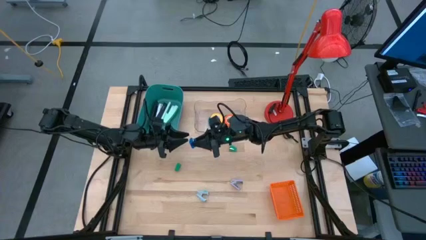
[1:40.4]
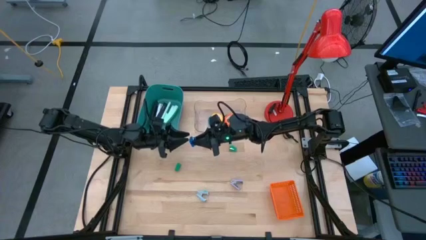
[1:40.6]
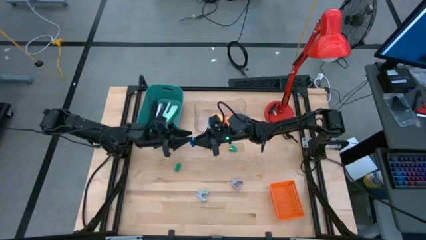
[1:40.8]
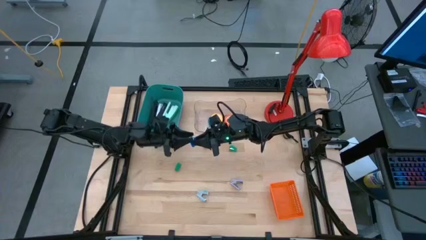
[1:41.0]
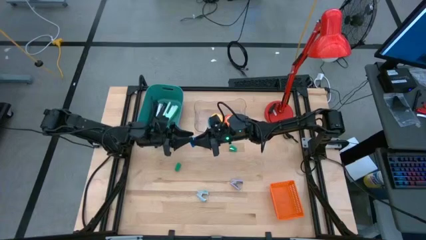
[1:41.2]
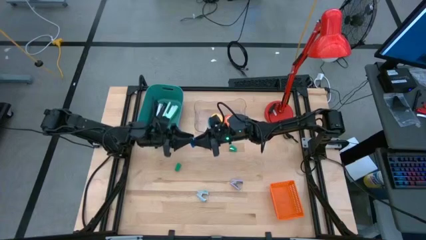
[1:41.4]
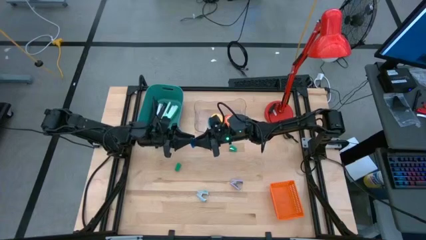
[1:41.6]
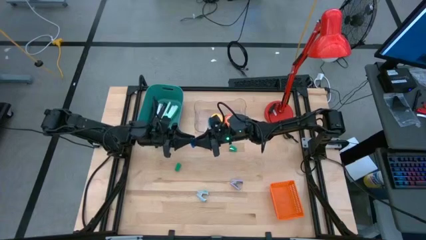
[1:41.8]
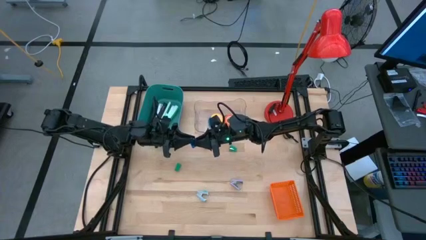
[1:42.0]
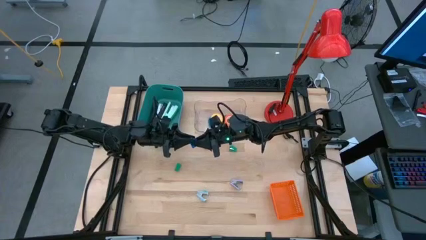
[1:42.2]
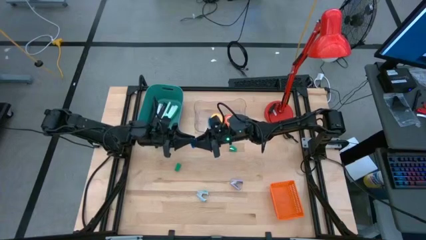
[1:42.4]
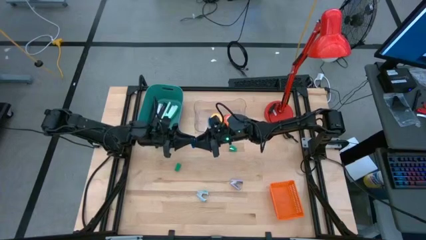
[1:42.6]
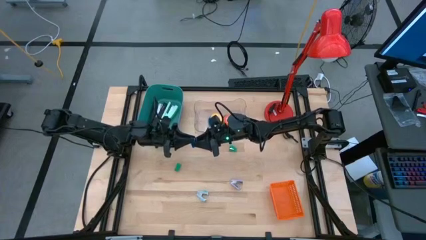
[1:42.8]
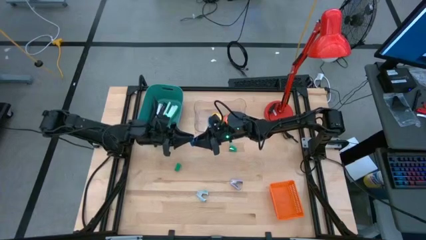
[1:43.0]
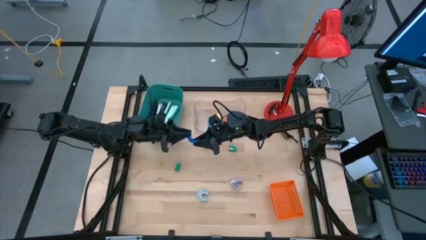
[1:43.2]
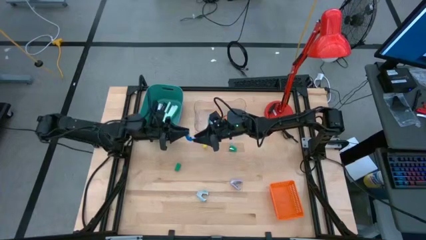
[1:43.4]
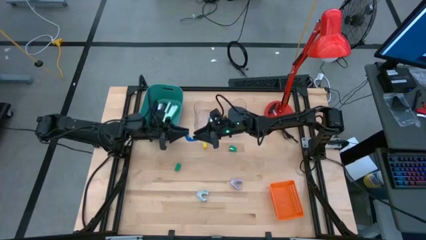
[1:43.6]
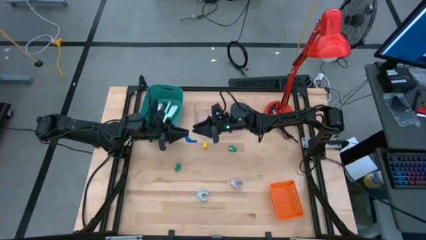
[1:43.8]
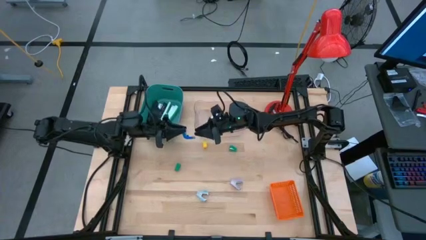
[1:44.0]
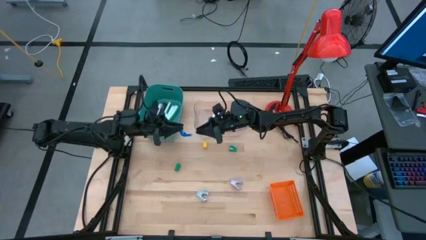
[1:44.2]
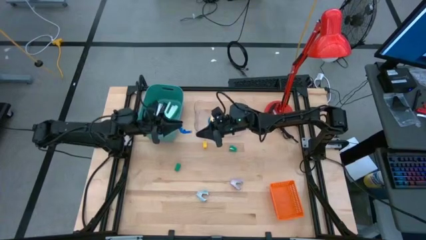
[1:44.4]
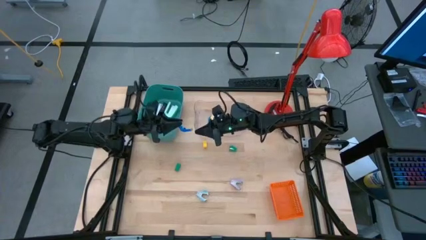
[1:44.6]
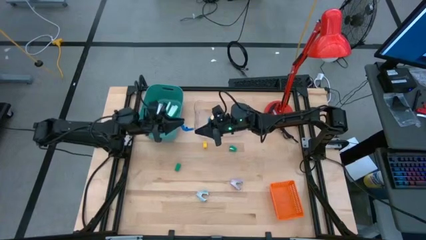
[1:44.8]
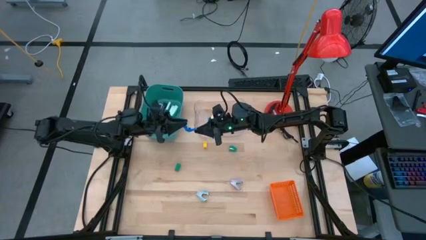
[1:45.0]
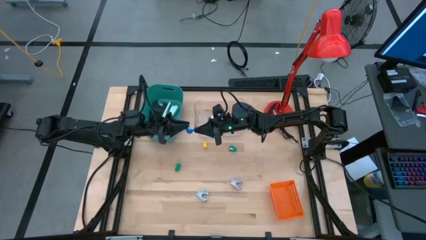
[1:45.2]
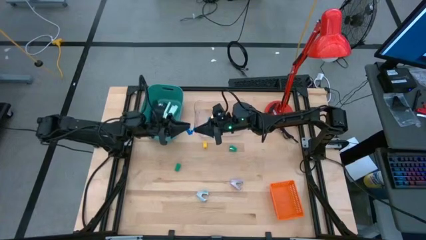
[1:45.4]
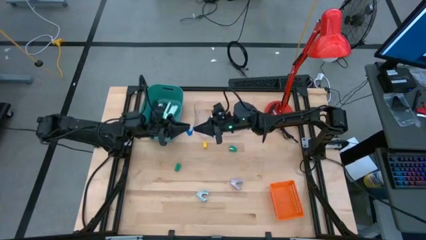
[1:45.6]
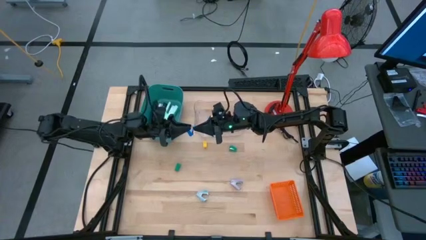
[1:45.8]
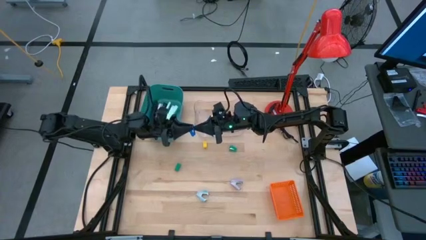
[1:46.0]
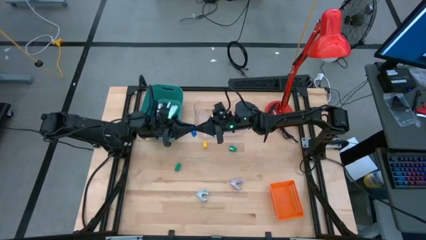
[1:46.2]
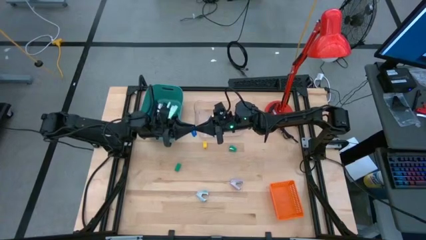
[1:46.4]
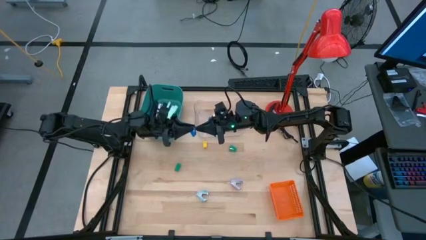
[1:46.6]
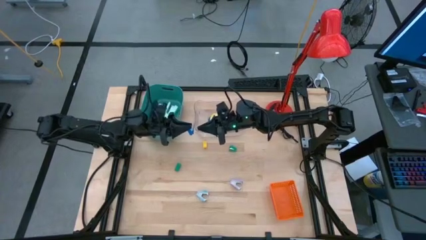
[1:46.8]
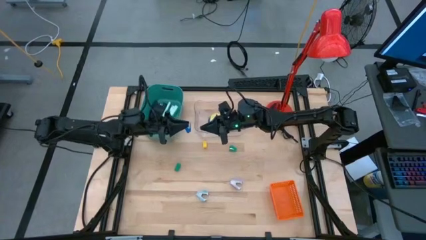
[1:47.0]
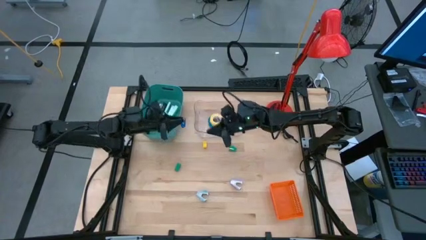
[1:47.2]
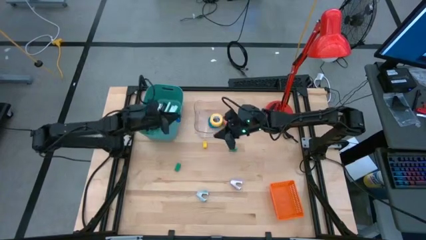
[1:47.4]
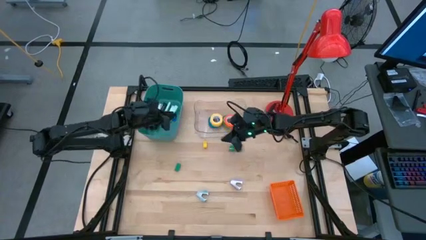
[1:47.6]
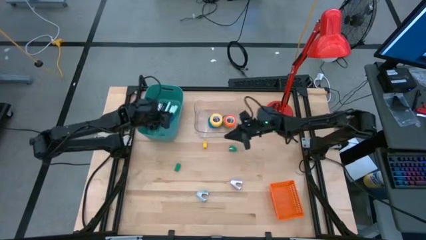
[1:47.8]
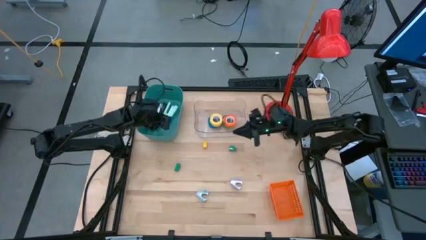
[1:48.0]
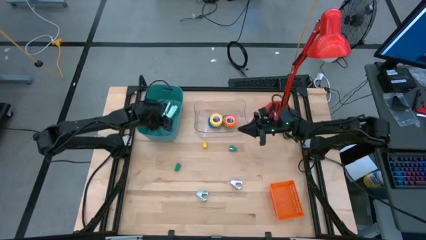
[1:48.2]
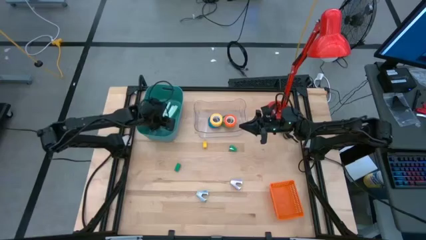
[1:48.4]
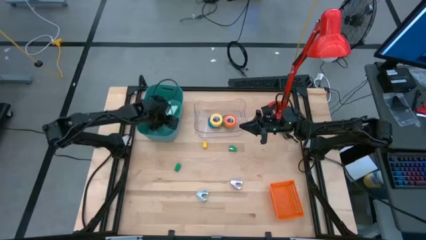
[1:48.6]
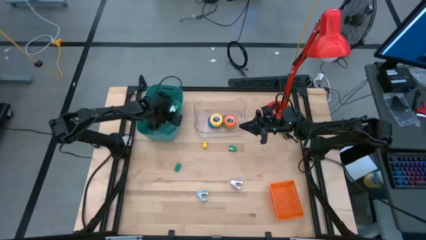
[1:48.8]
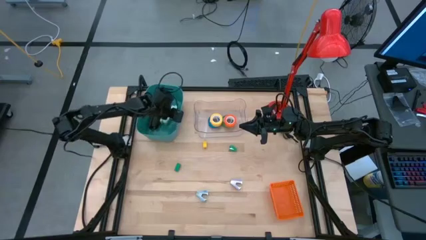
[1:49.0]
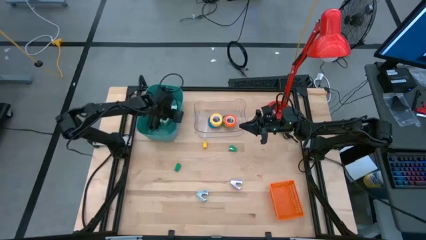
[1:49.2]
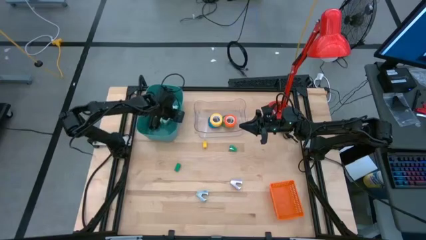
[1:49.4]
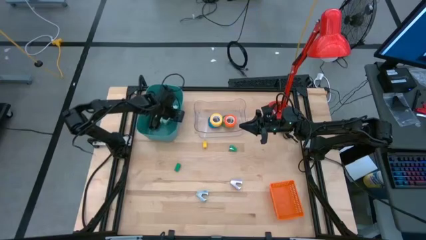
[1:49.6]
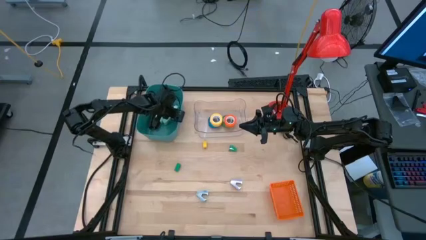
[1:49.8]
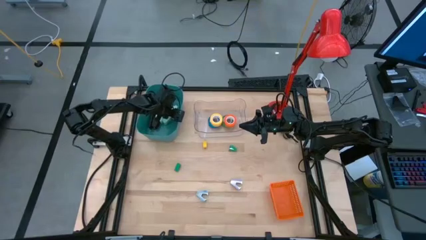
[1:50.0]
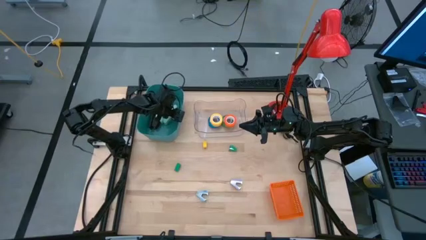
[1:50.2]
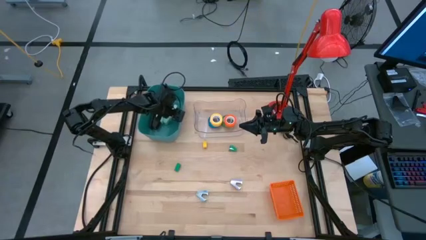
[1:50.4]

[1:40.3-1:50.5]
Task: Pick and place Stapler, Stapler remover, tape
Put the blue stapler remover into the green bin
